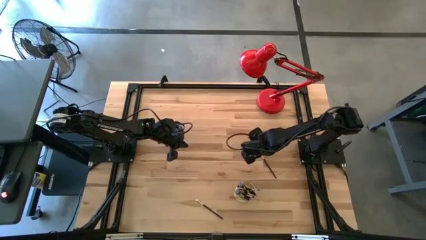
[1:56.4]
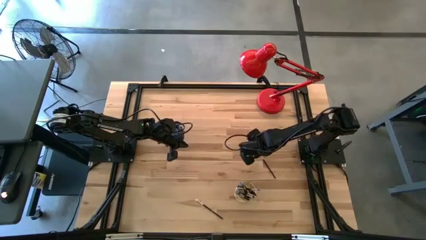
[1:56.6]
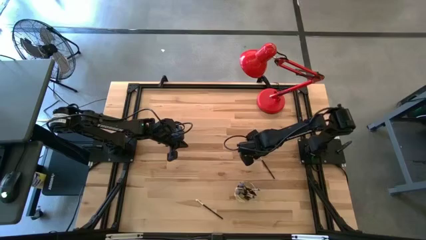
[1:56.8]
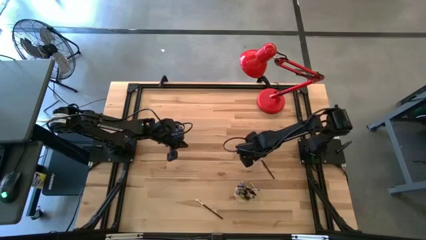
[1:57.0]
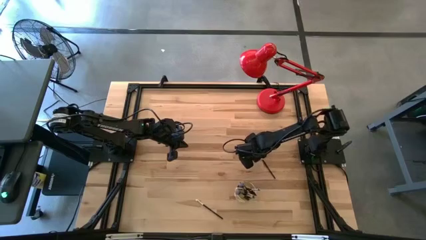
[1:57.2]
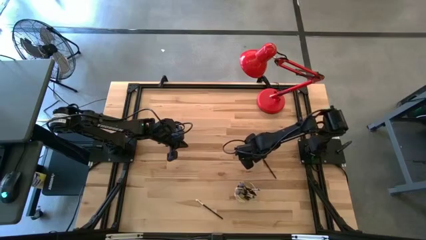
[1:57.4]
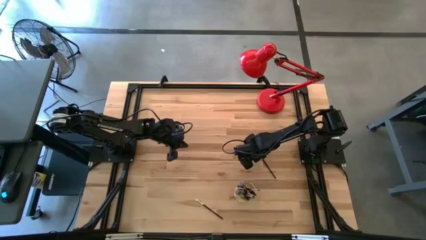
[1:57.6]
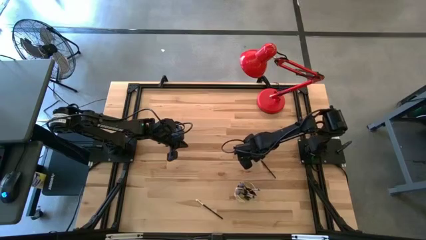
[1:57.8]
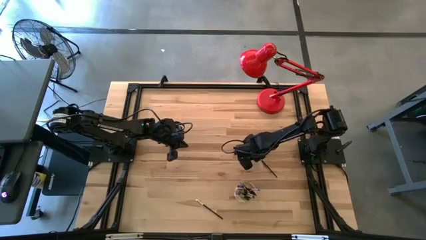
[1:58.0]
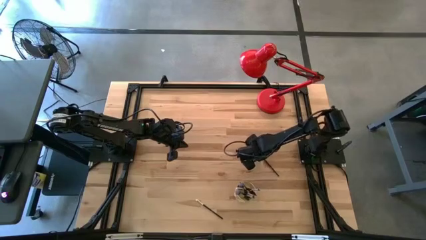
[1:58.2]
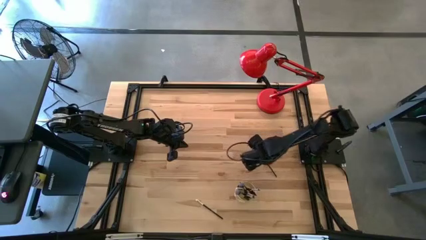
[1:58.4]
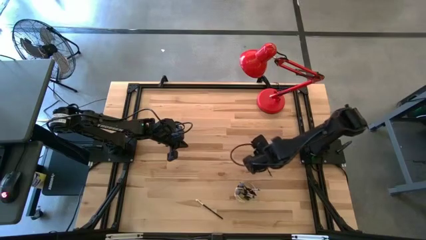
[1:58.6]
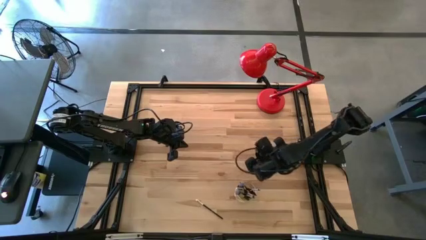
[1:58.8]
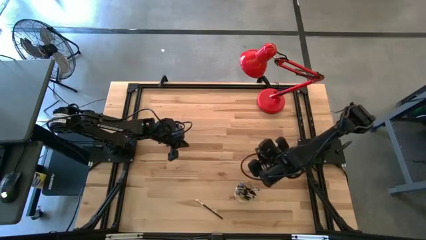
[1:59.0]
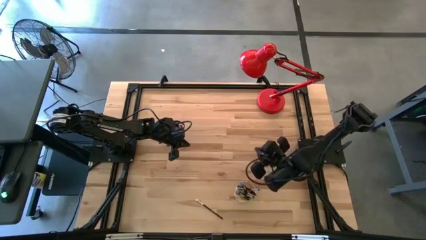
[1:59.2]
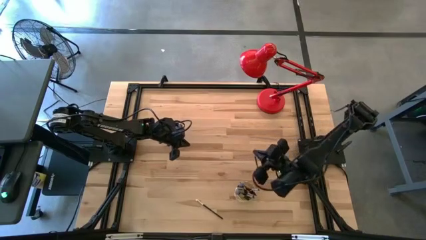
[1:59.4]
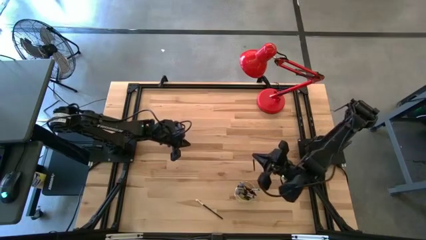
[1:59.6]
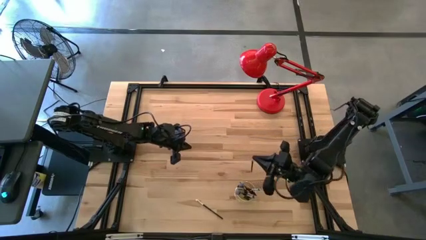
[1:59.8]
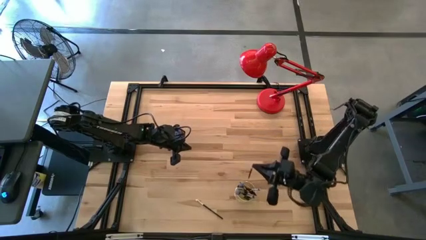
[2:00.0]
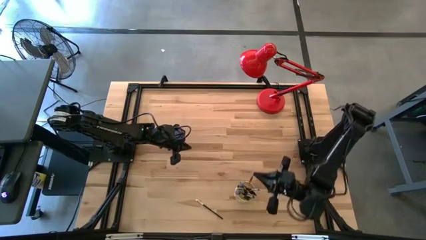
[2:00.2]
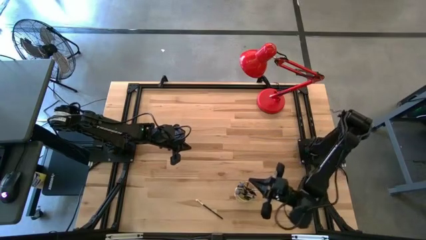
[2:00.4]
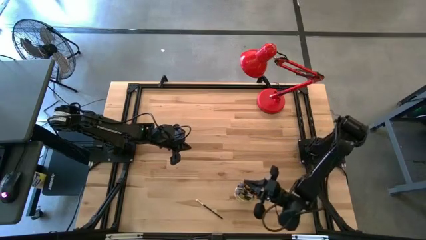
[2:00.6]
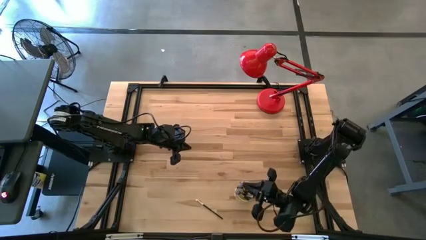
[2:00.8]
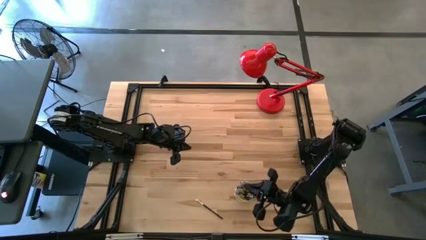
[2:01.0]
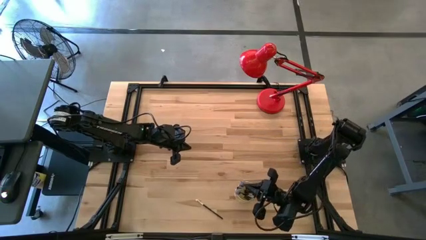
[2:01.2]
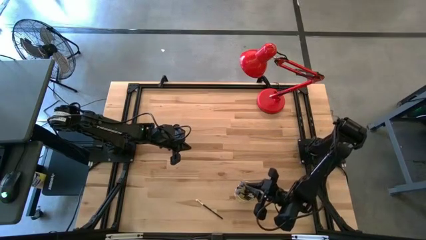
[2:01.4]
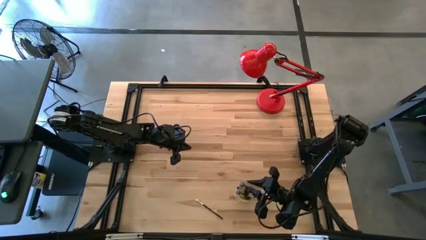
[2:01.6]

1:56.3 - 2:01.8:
Task: Pick & Place Makeup Brushes
Put the eyeshadow brush into the gold makeup holder

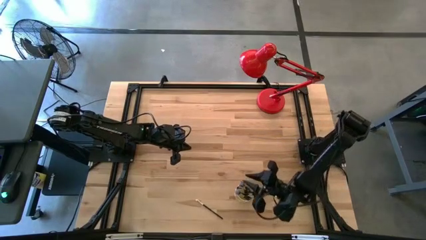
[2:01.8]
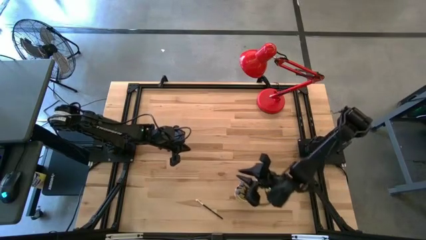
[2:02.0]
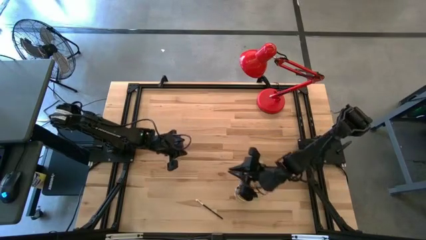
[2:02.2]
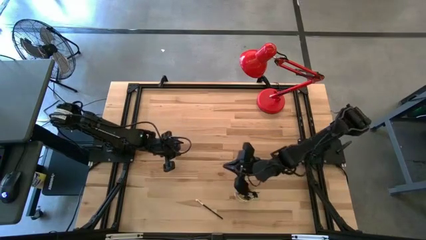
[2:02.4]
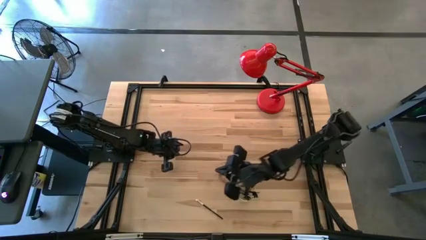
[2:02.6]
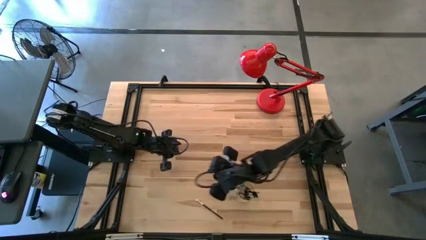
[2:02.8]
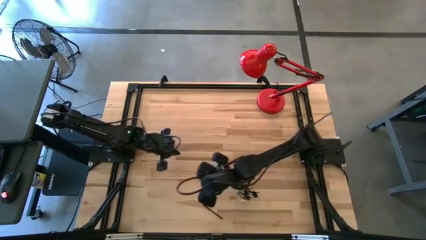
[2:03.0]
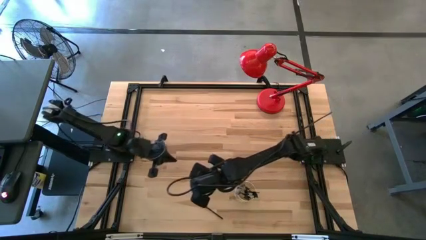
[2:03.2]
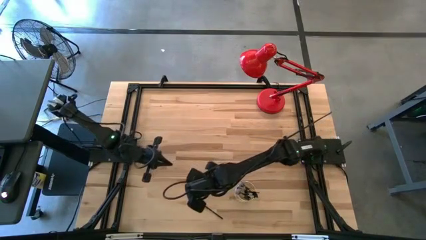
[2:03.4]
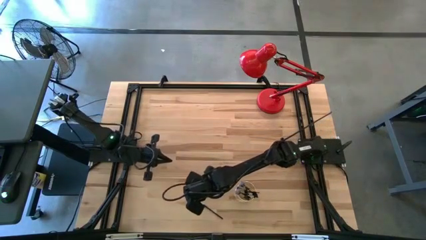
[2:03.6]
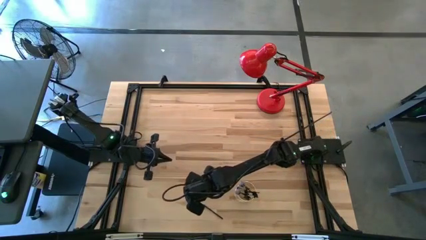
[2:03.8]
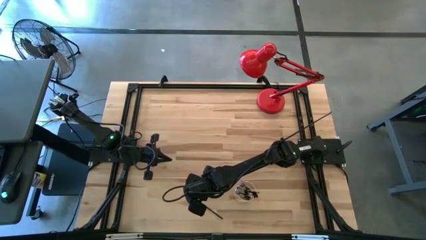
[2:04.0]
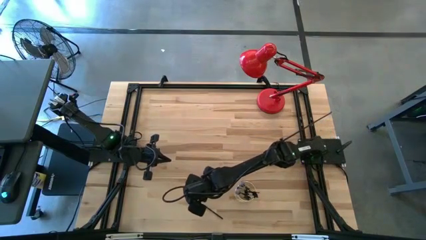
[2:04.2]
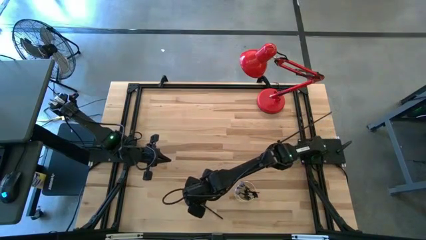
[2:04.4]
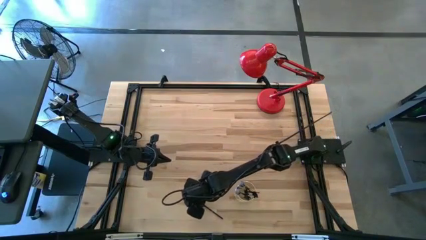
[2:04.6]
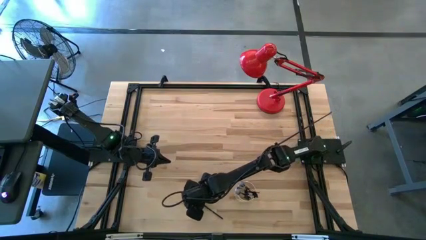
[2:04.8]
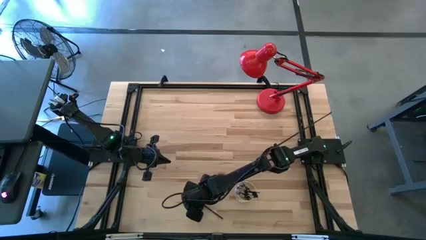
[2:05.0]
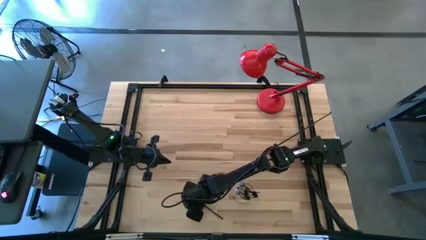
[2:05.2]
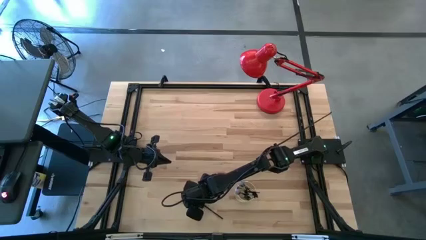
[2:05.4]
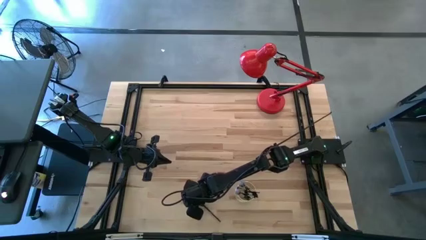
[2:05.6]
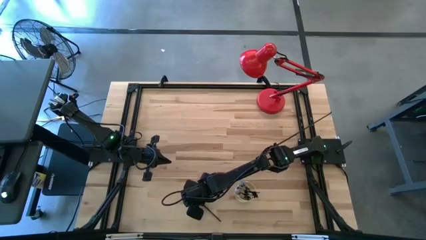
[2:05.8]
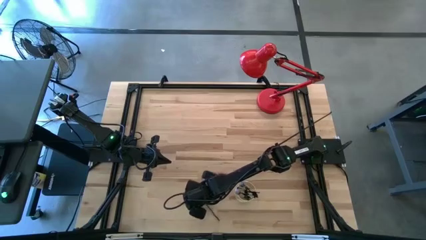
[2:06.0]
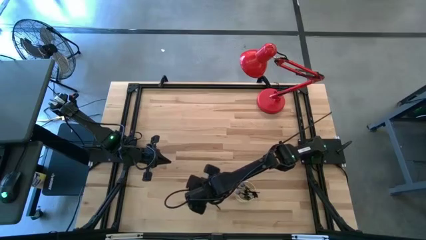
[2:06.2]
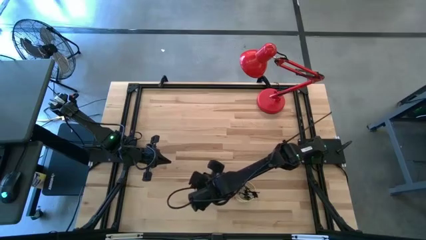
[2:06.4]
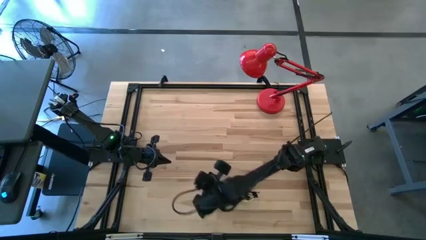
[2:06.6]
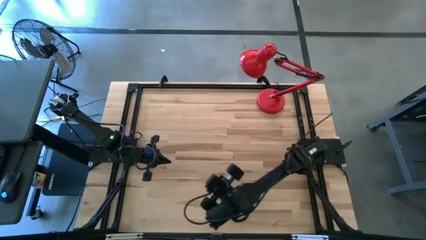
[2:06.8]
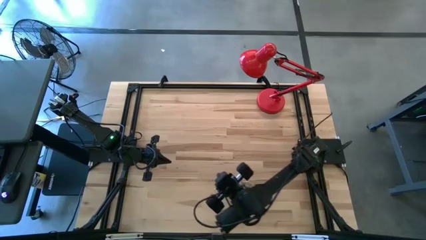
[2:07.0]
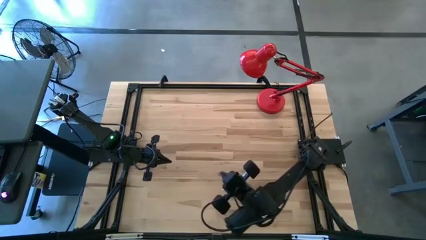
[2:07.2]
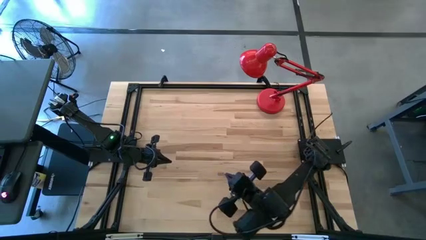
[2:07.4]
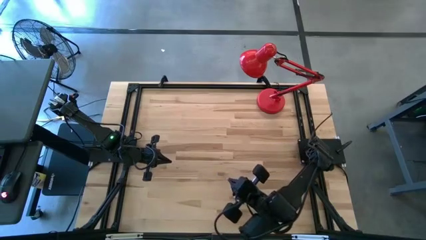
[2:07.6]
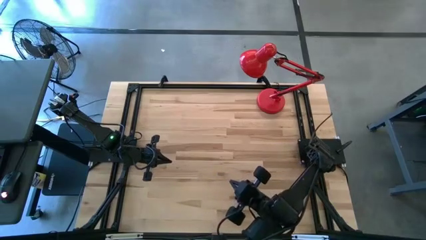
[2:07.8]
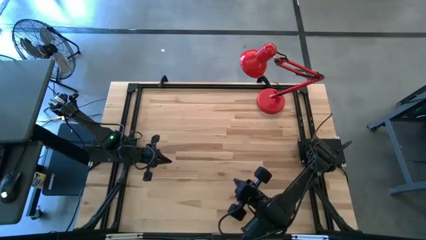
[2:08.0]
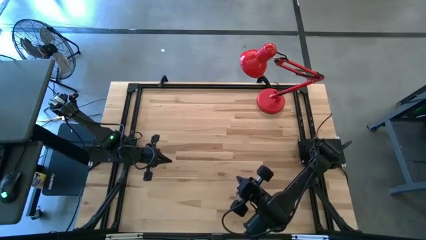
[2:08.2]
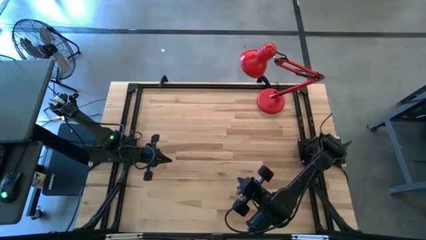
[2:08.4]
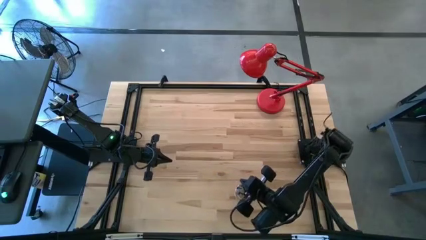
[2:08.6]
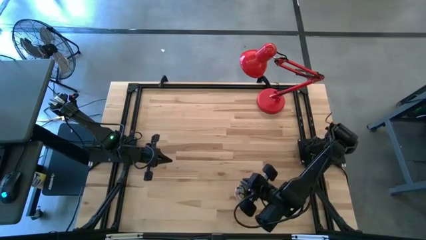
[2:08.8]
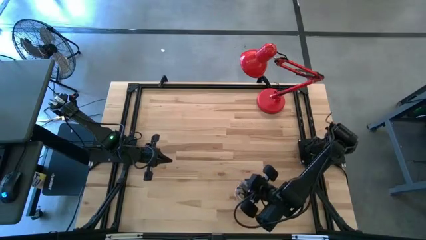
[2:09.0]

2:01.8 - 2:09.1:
Put the eyeshadow brush into the gold makeup holder

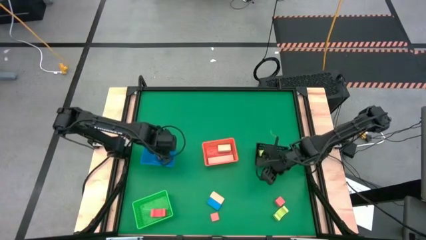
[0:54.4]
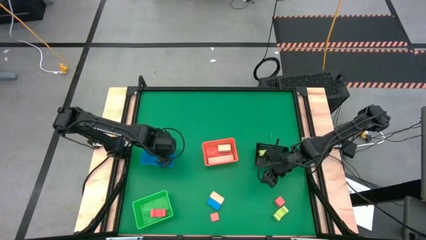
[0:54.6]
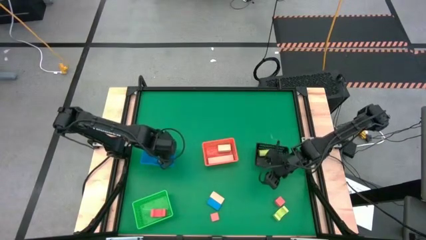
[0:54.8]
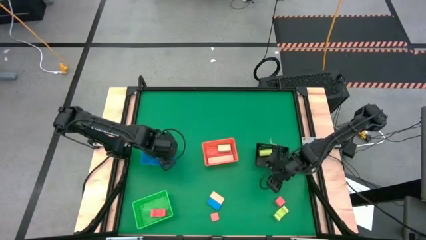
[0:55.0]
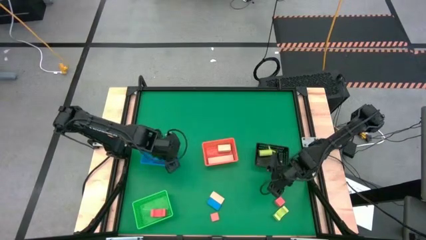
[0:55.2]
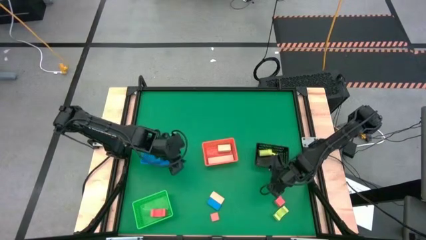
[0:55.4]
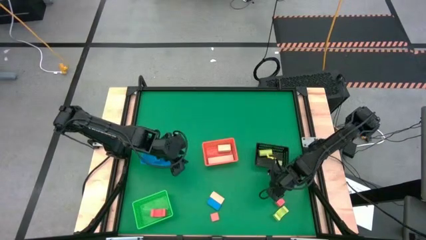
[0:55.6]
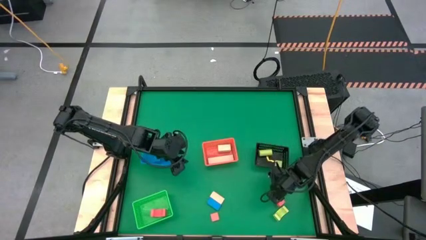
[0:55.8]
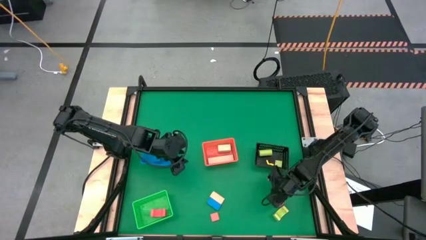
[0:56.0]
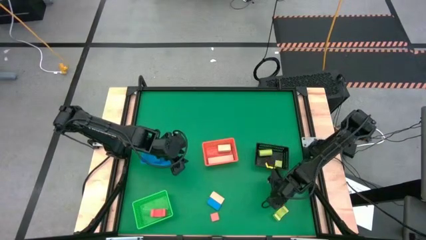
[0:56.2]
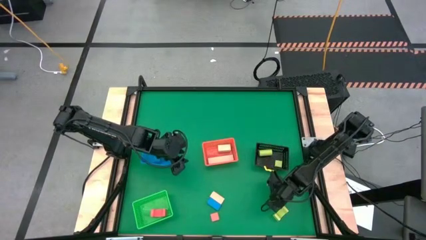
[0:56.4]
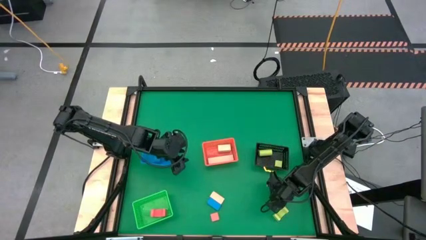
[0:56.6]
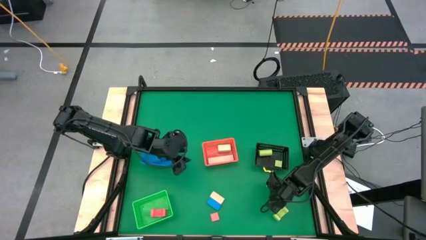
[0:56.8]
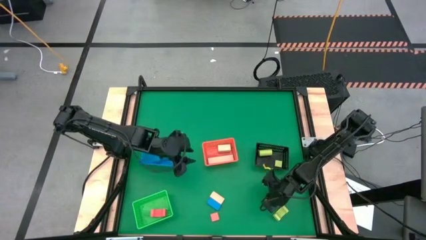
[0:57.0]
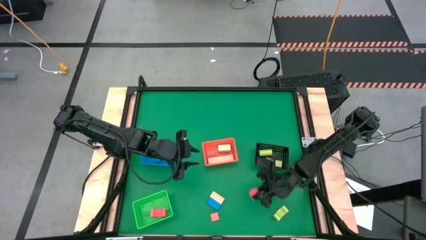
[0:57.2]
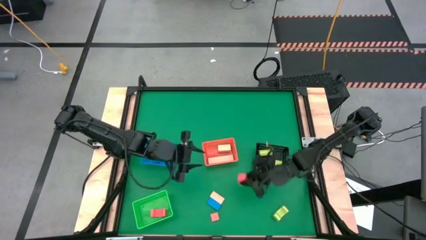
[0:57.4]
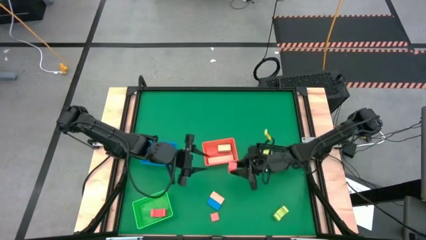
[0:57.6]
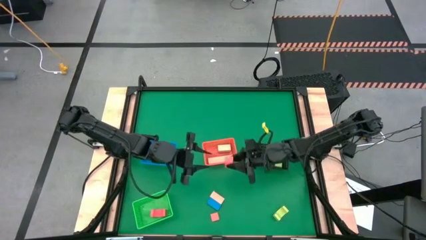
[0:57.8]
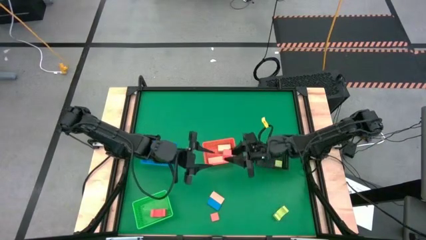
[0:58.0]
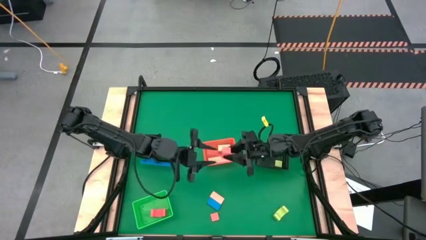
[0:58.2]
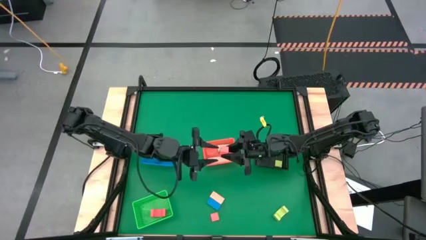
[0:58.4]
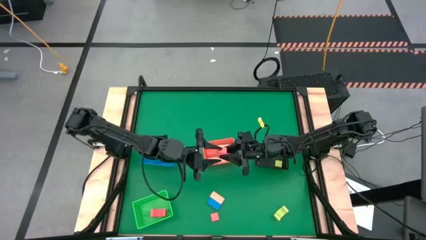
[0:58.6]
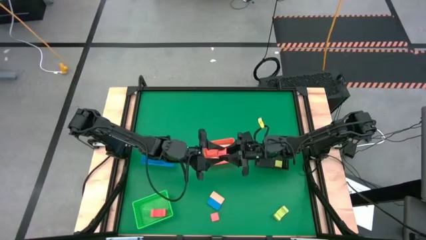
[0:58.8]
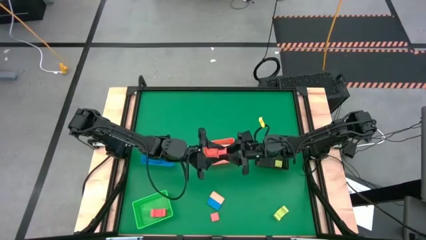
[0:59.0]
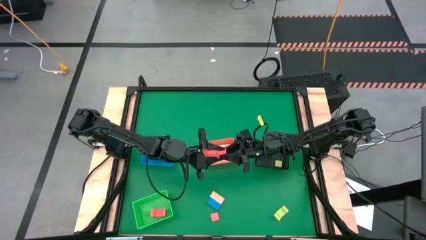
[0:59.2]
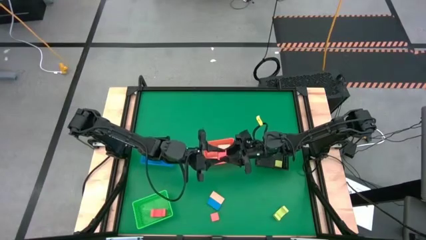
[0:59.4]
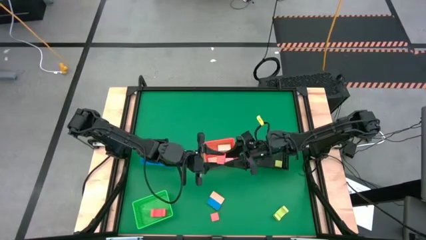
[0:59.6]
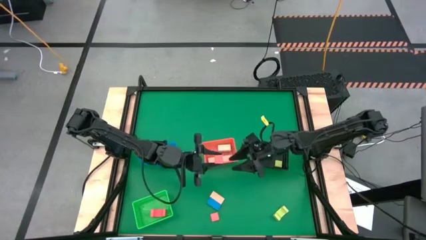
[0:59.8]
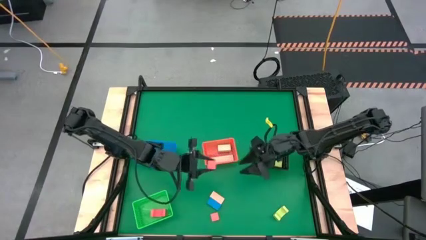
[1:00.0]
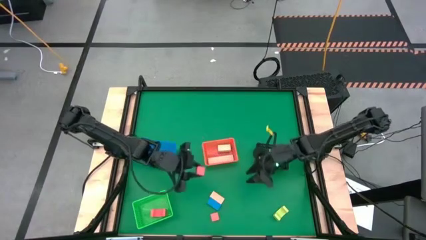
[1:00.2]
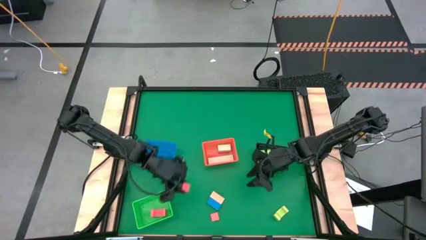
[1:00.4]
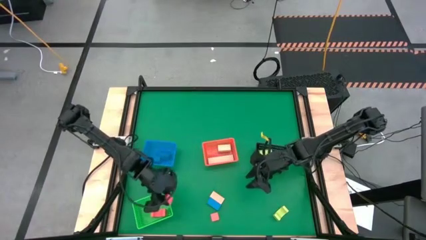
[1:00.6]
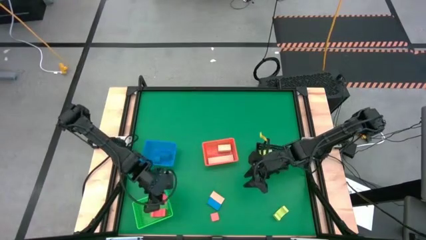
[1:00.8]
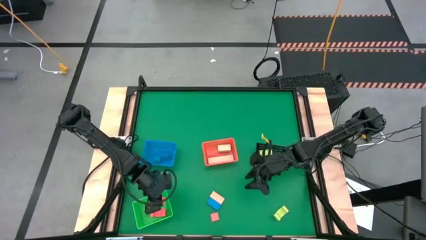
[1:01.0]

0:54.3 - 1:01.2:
Task: Sort & place blocks by color
Put the top orange block into the green bin
